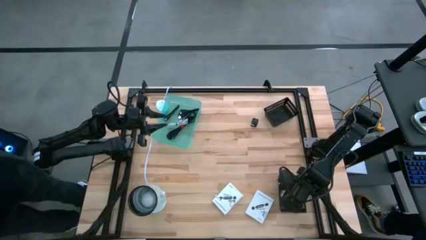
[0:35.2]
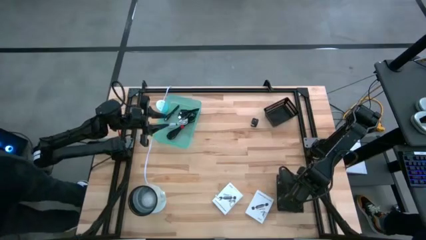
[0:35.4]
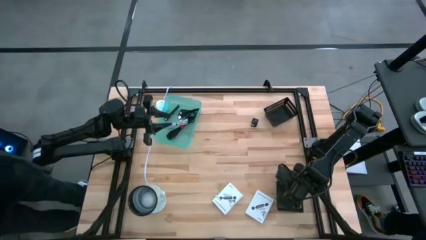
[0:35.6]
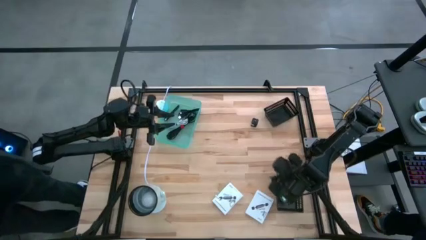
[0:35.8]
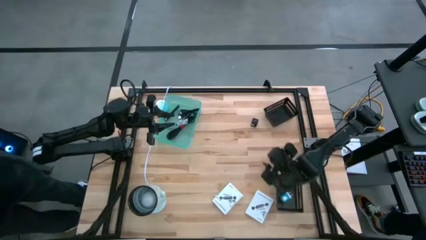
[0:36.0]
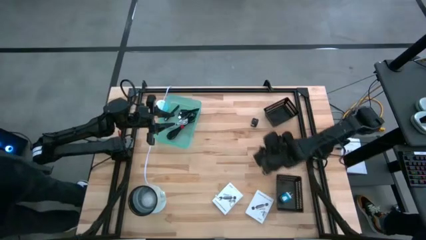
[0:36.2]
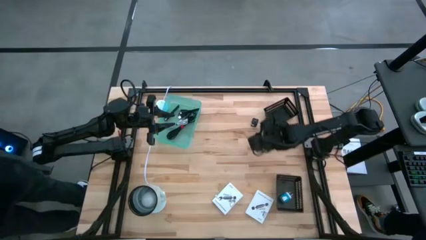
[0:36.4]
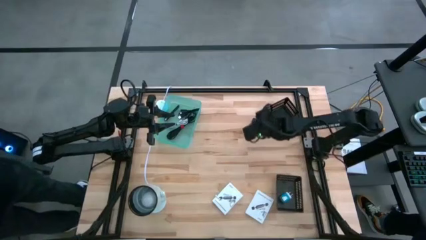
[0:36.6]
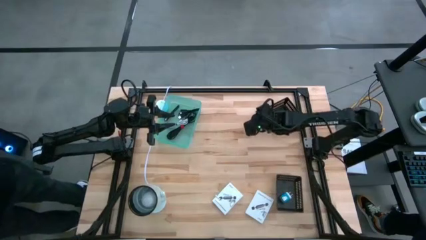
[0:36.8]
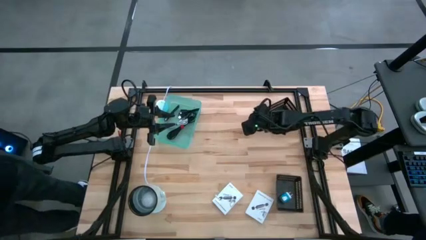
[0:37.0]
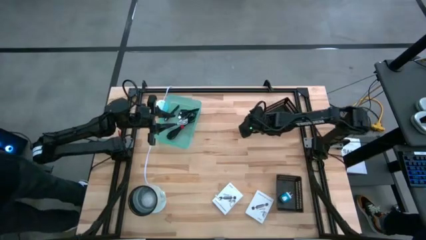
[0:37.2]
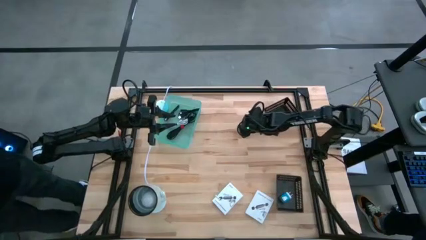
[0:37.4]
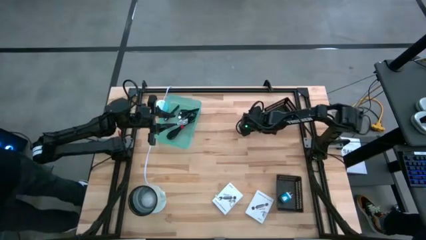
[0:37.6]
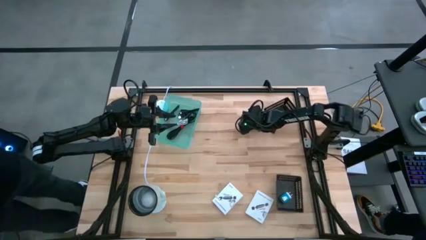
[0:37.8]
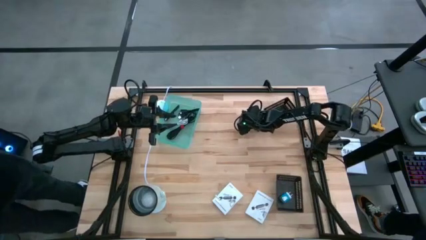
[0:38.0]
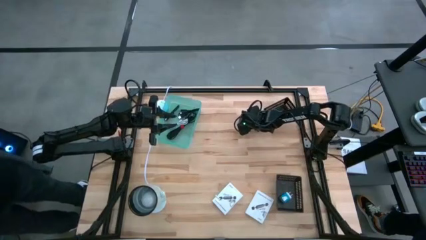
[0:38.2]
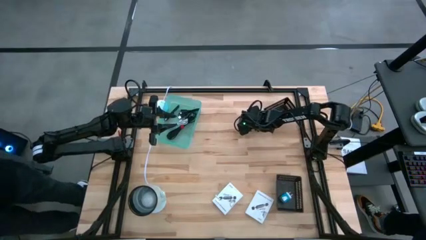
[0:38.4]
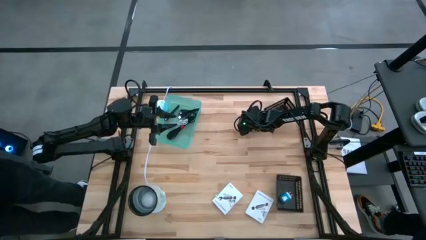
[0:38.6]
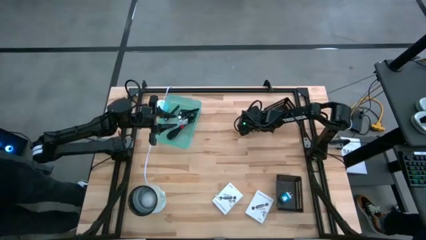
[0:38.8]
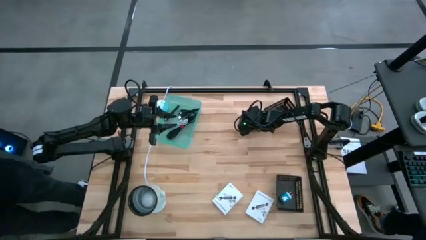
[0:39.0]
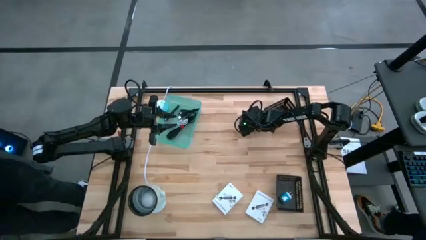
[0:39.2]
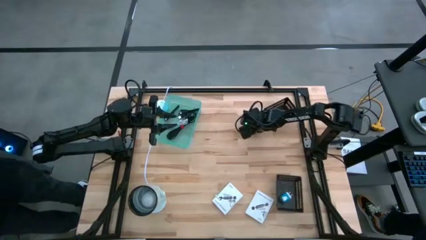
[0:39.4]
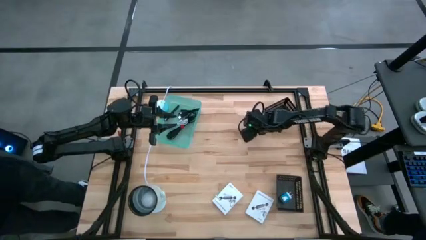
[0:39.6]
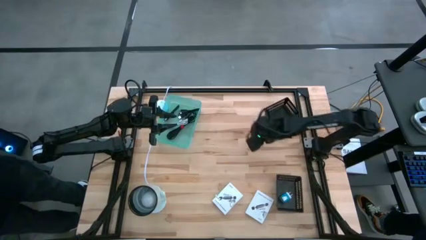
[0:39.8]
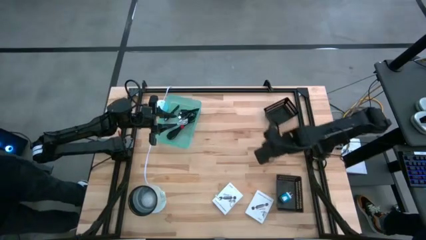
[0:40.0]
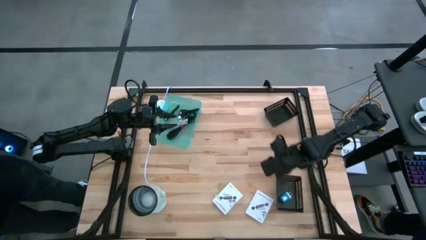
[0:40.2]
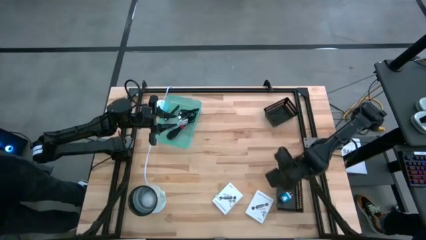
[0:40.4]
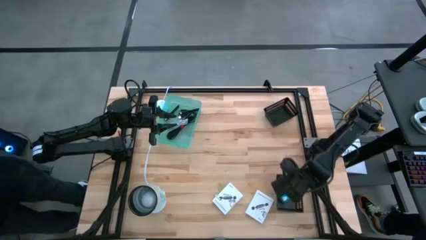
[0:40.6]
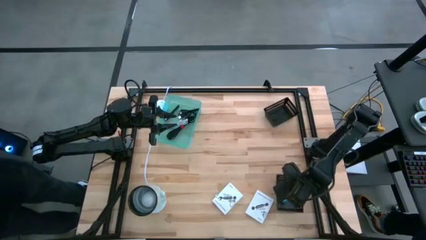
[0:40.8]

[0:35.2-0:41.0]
Task: Pick and place items into bin
Put the black charger adapter into the bottom black bin

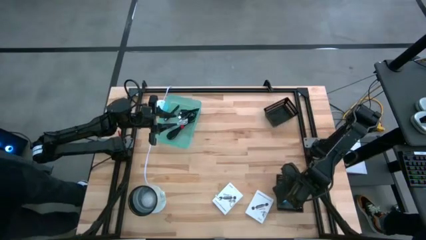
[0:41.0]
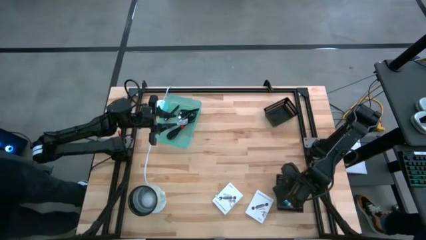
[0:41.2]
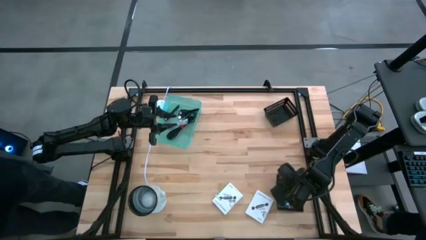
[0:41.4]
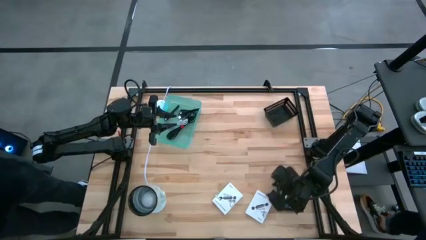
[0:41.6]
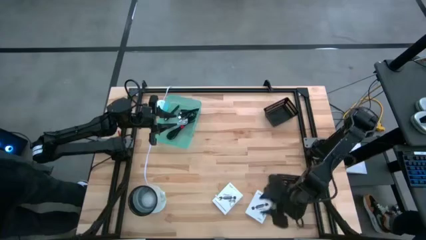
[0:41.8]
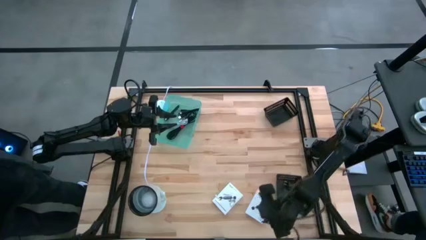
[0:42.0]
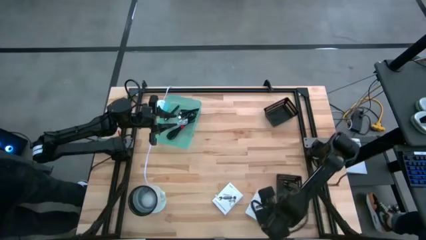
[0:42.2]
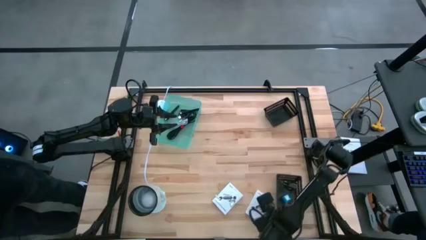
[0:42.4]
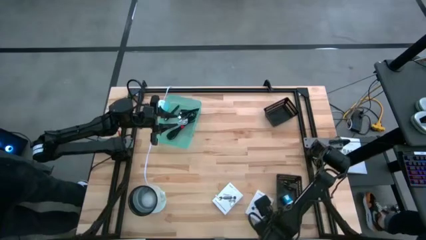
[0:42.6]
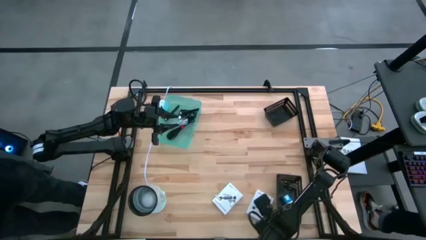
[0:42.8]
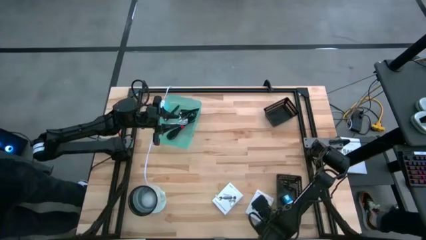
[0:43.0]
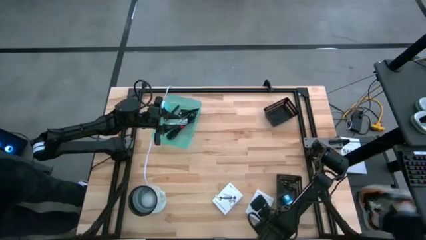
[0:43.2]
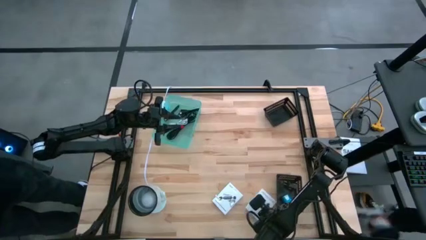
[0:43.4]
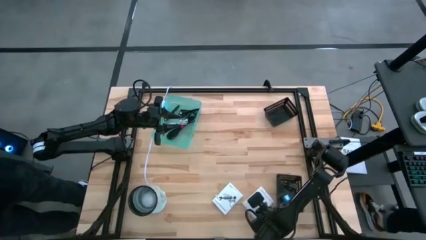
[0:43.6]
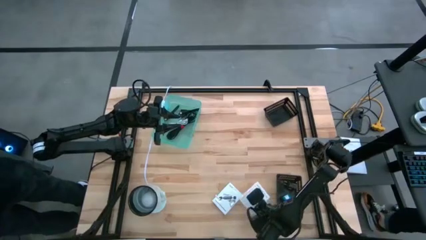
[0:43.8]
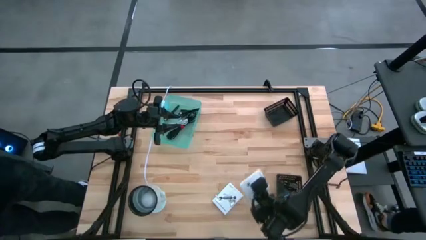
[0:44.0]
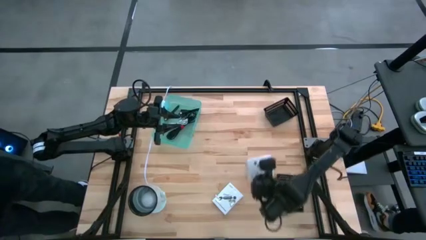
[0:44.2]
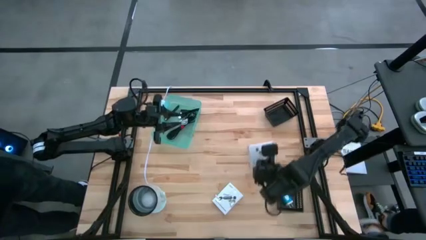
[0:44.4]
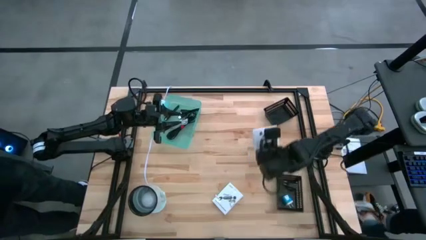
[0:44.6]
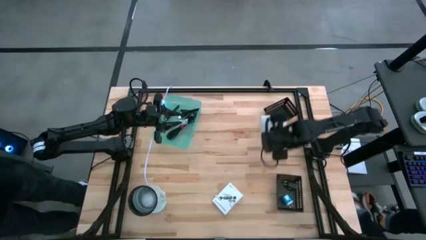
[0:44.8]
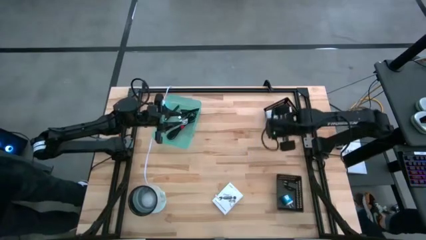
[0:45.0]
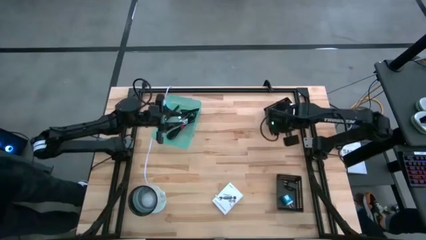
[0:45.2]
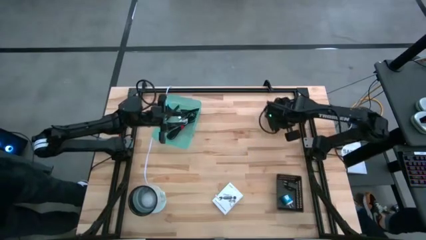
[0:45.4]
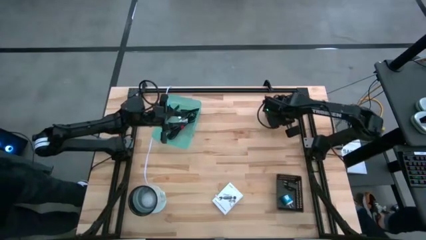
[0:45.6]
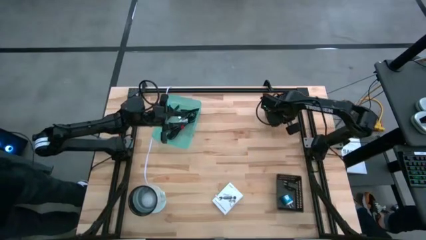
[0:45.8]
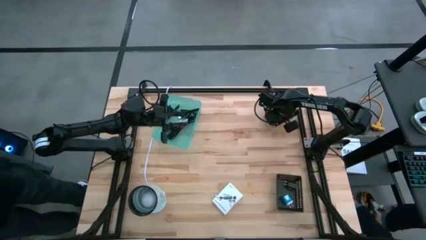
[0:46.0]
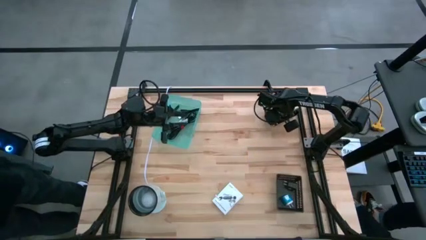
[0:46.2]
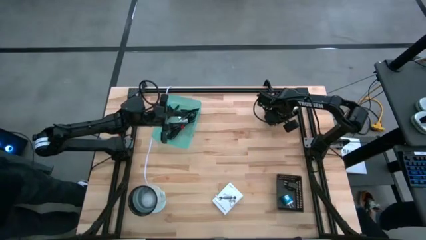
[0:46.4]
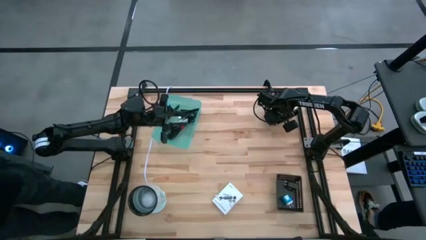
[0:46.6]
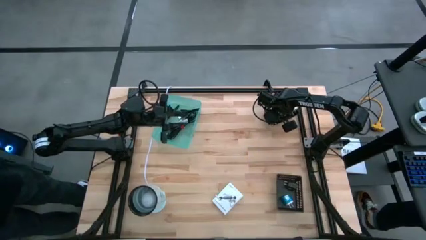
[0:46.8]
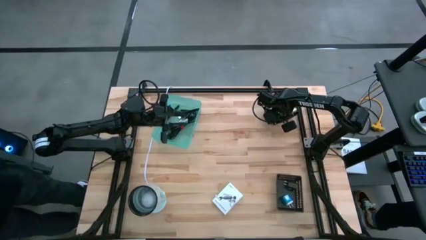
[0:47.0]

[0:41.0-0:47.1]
Put the right white card reader box into the top black bin

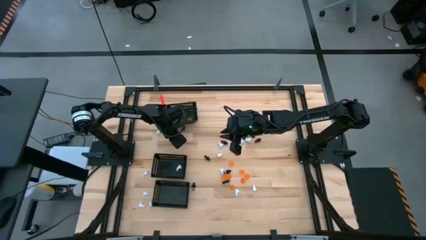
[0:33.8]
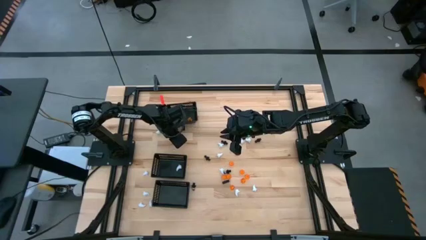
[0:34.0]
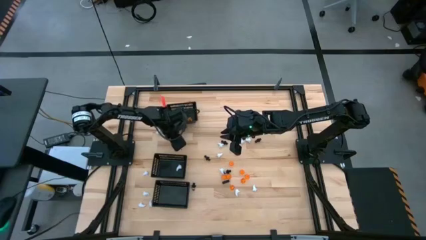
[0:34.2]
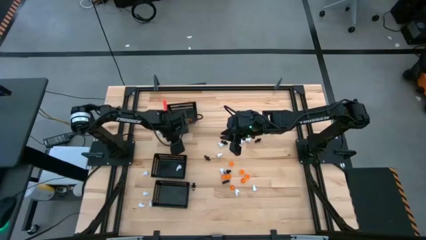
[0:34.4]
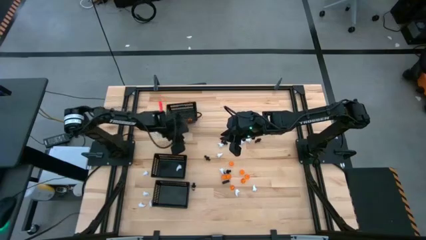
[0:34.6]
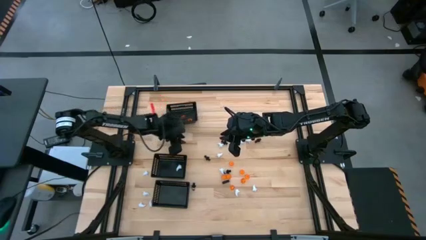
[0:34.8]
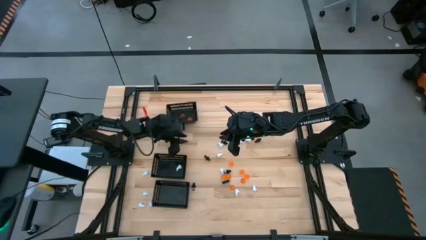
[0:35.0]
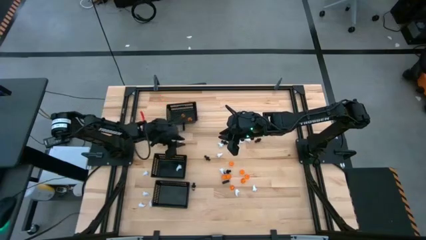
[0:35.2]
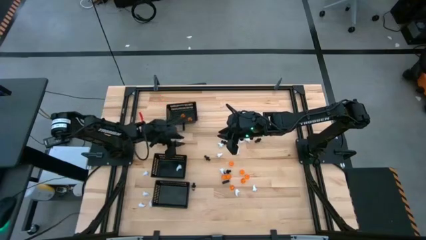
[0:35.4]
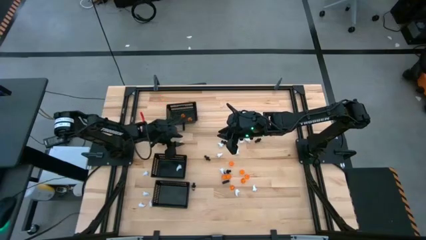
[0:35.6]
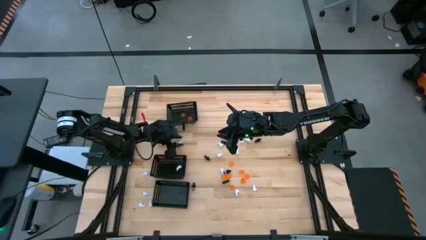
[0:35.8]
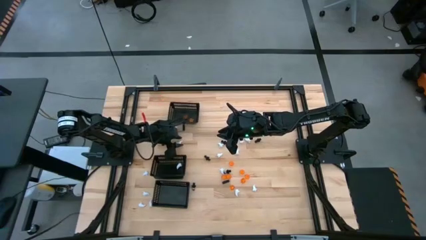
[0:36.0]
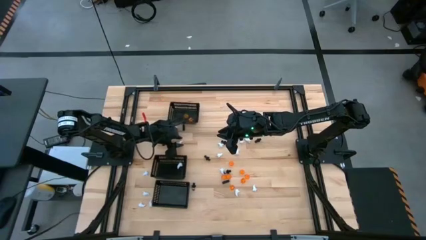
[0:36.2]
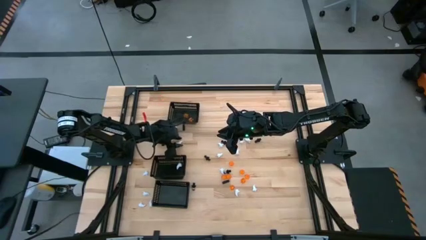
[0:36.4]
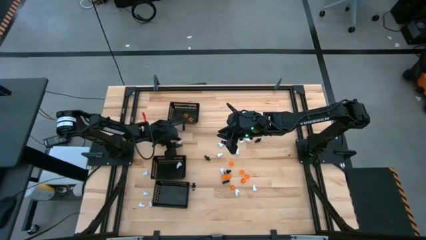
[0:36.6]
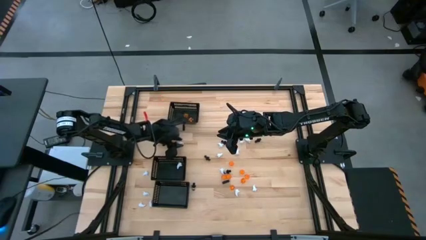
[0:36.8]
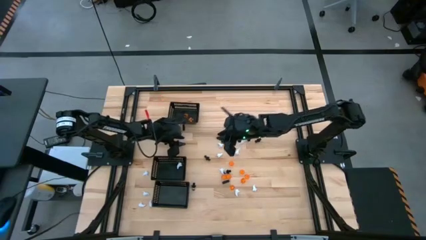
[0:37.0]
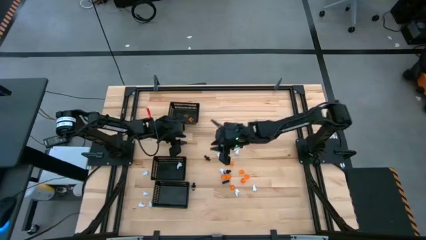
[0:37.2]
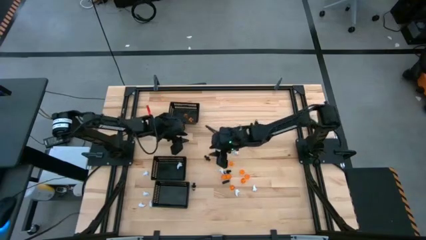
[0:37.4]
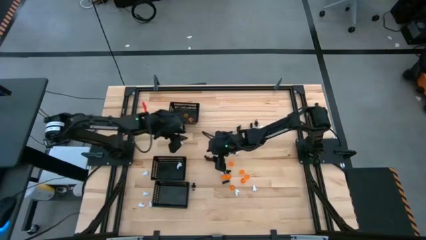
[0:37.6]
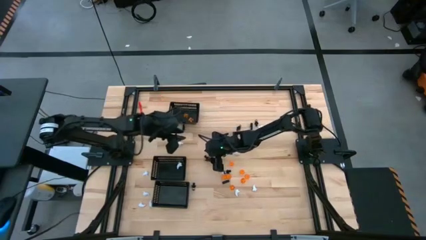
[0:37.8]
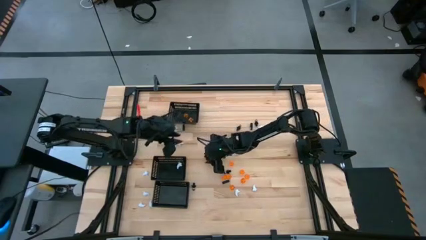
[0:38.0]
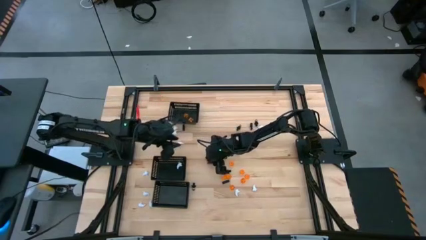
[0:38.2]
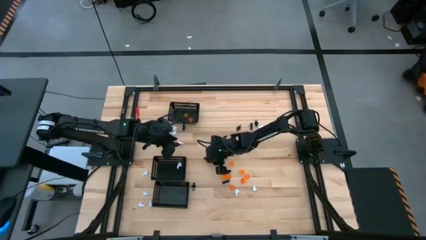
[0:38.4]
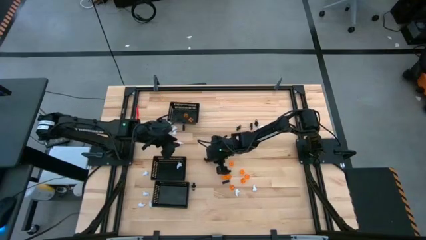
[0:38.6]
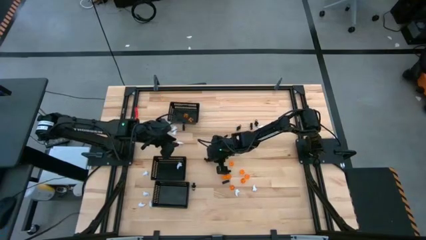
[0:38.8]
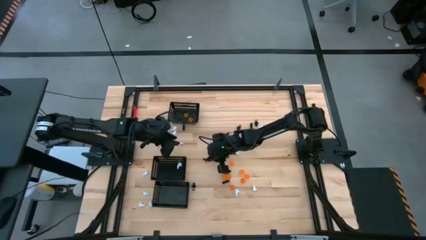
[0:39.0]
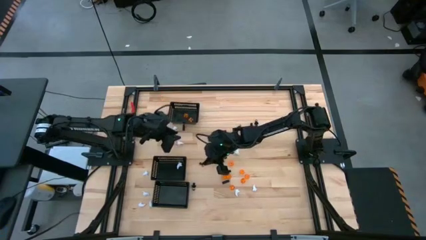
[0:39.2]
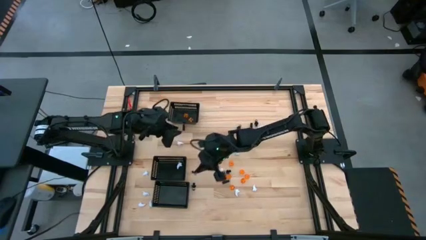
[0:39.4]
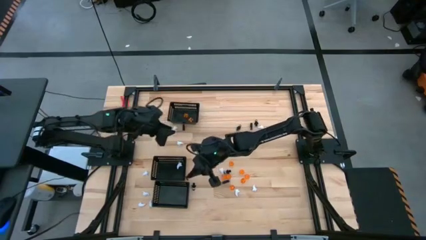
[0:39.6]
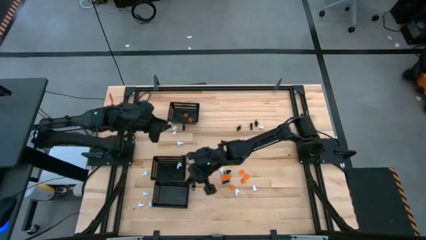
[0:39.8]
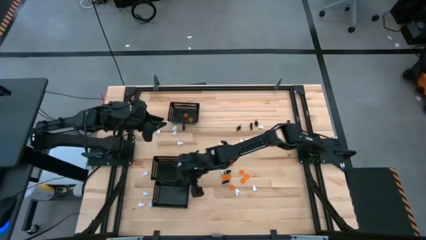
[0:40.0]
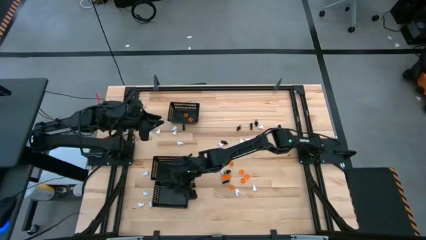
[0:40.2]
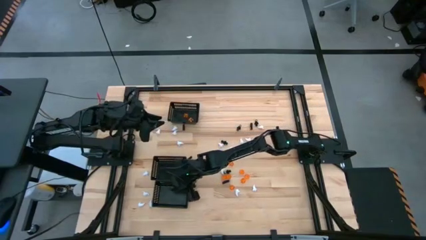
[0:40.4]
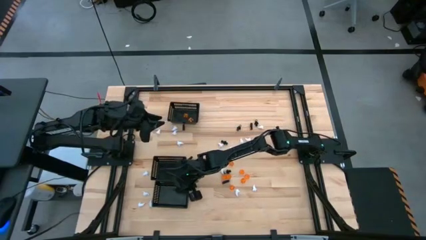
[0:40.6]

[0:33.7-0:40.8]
Task: Sort Halloween decoration
Put the black skeleton toy into the bottom black bin
